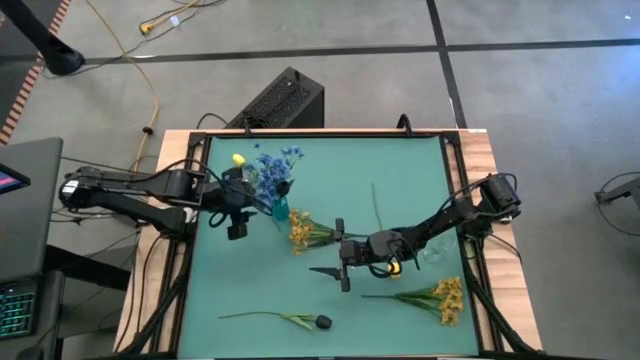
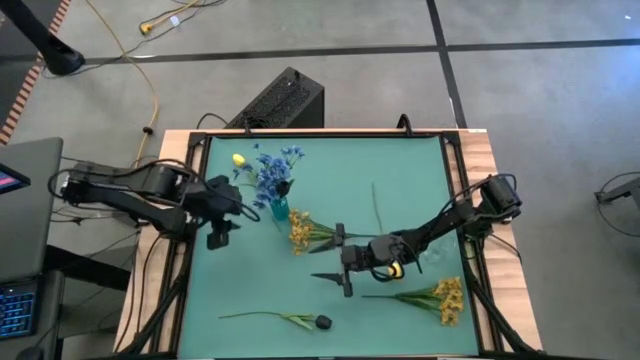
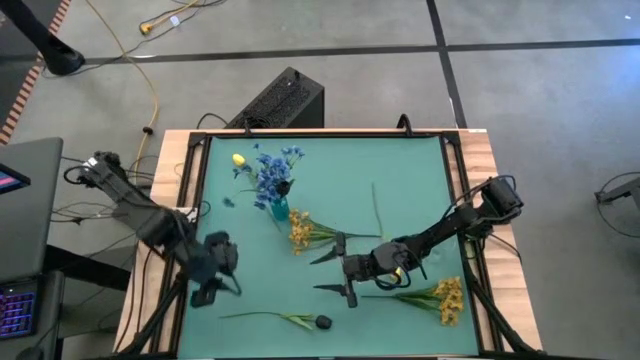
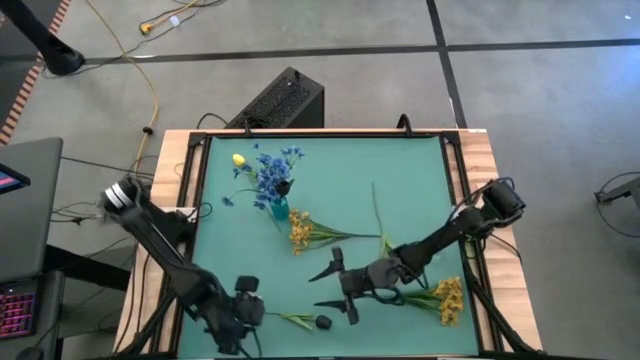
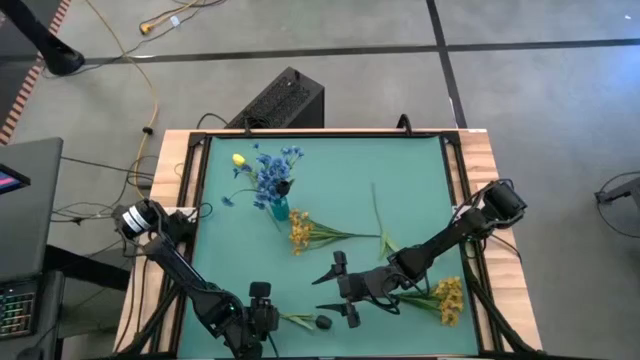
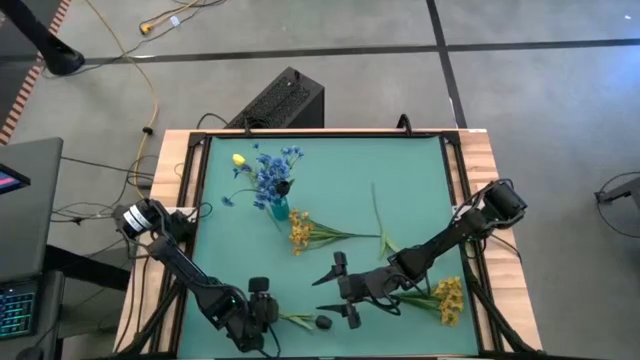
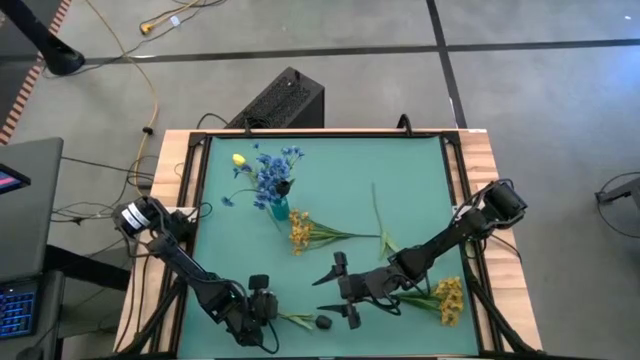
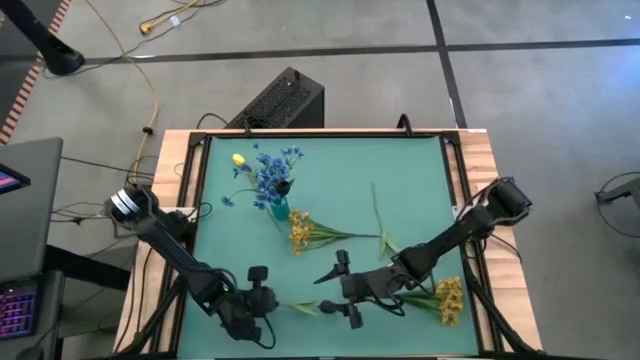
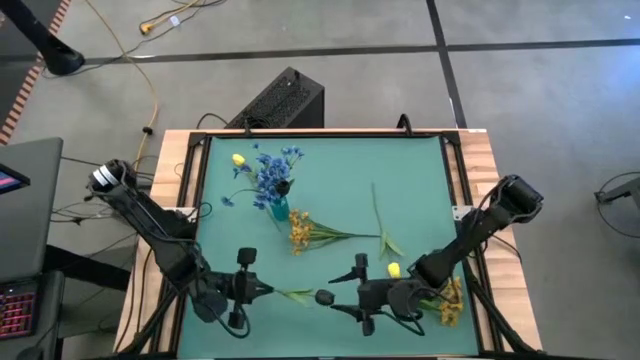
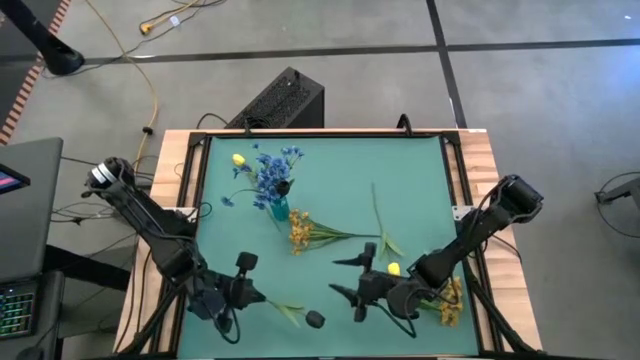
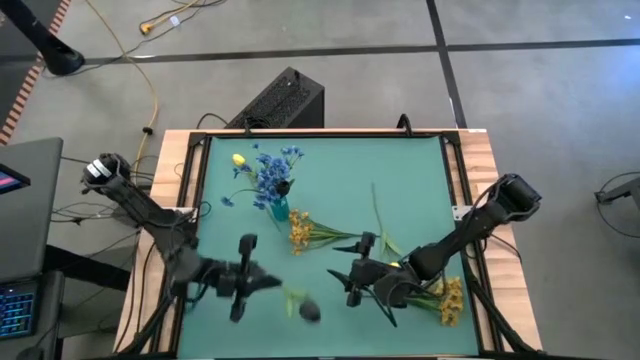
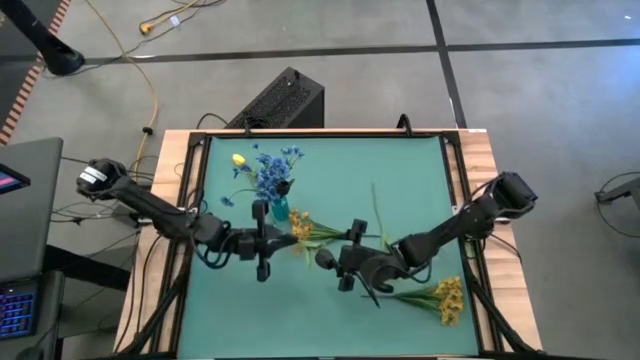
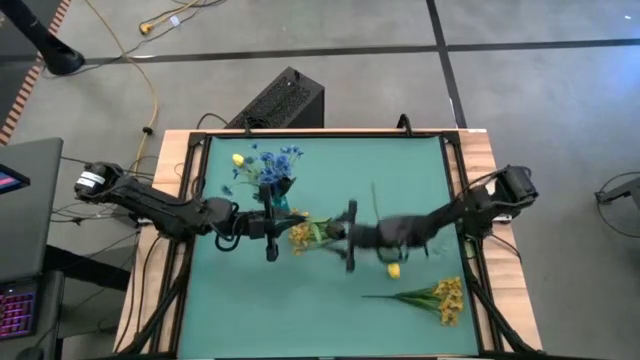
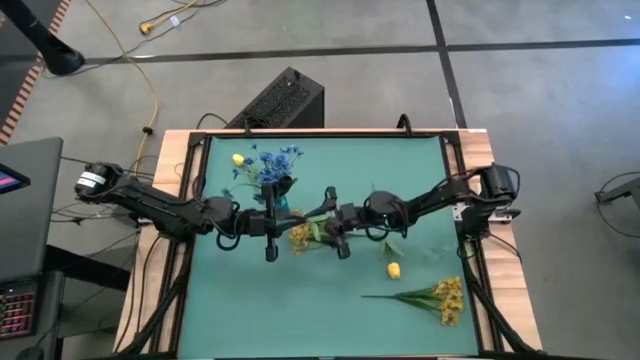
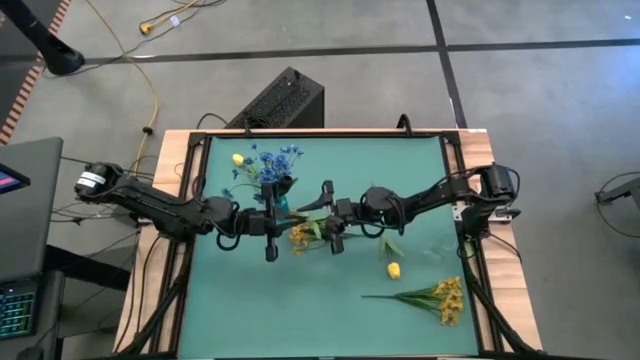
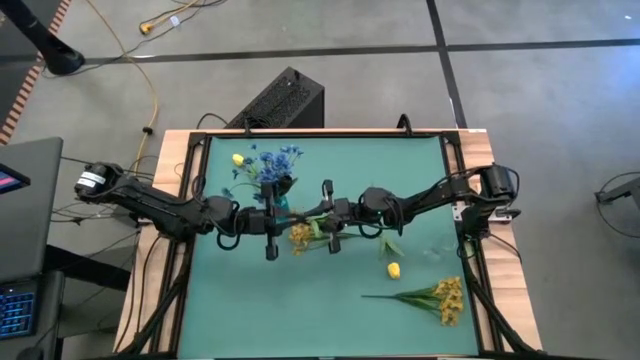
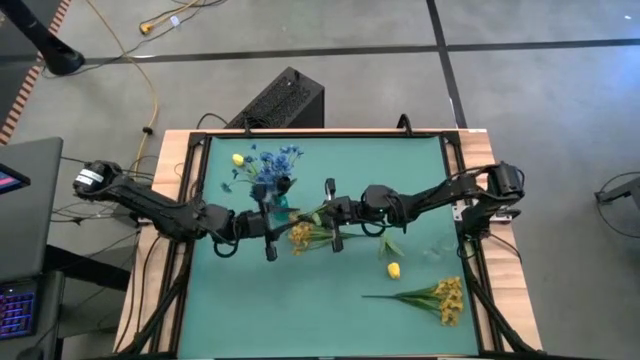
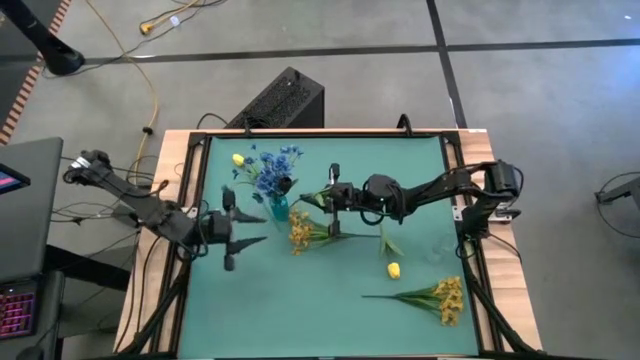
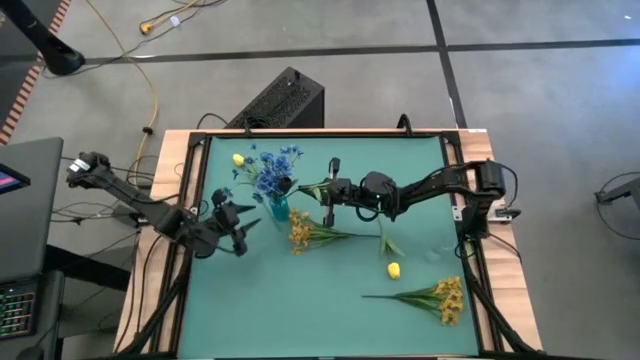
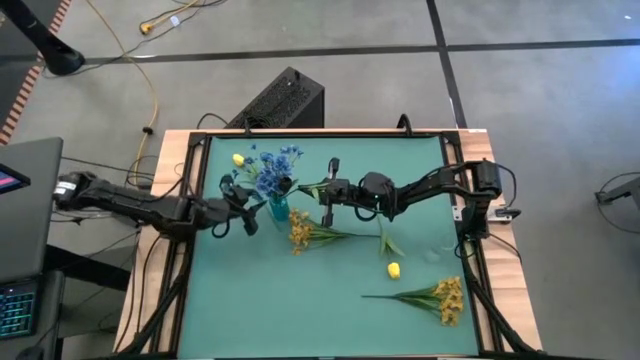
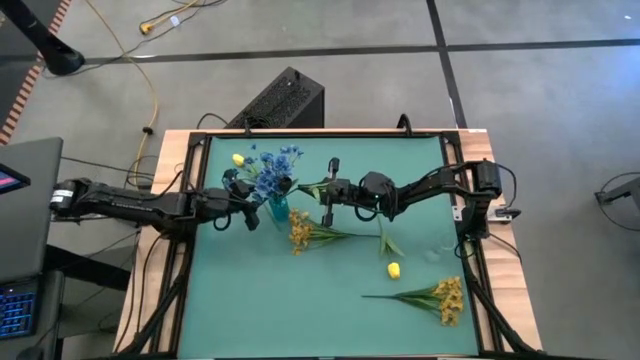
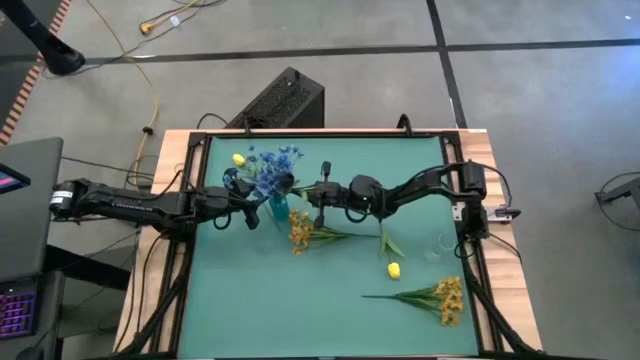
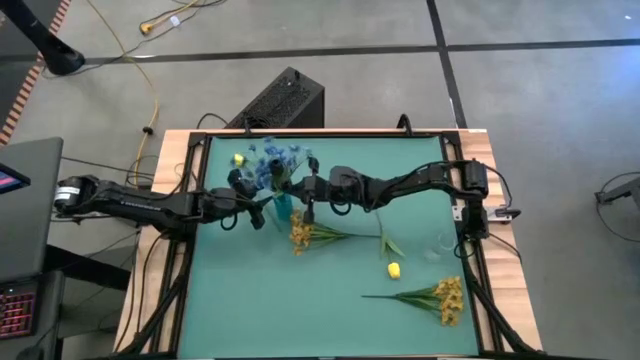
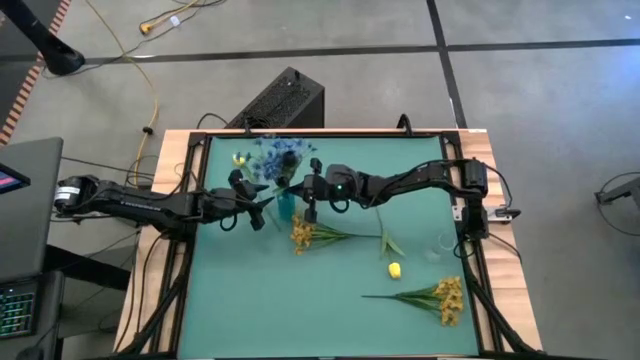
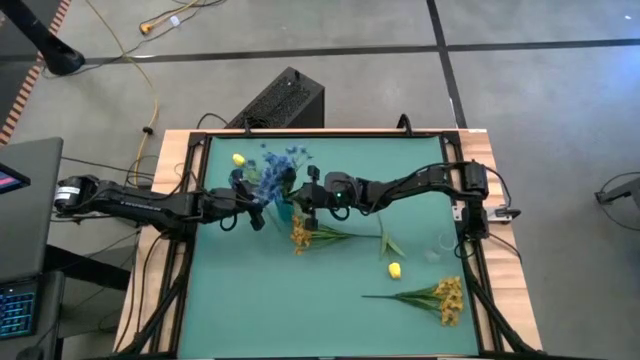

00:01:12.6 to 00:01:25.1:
Task: Sort flowers into vase by color
Put the black flower into the blue vase

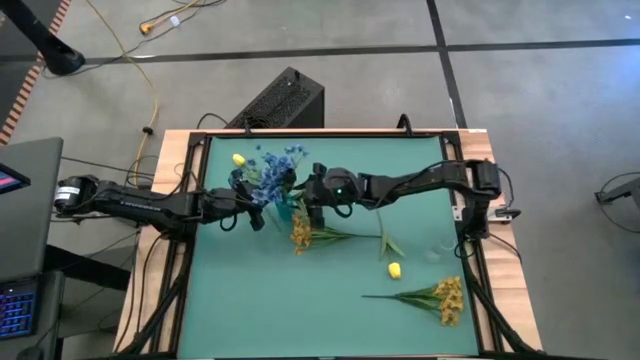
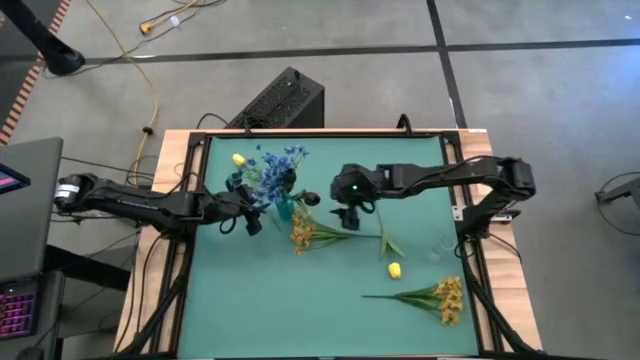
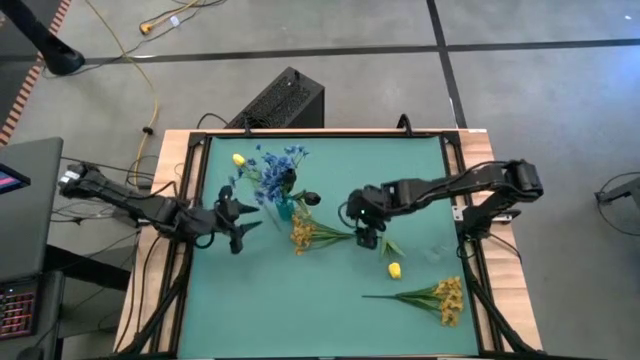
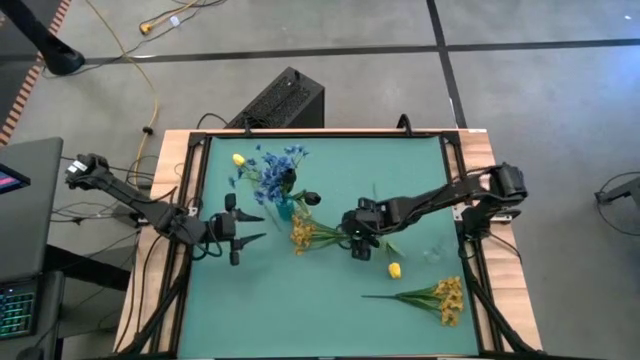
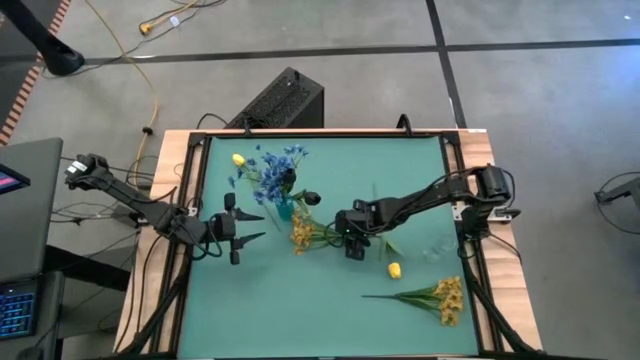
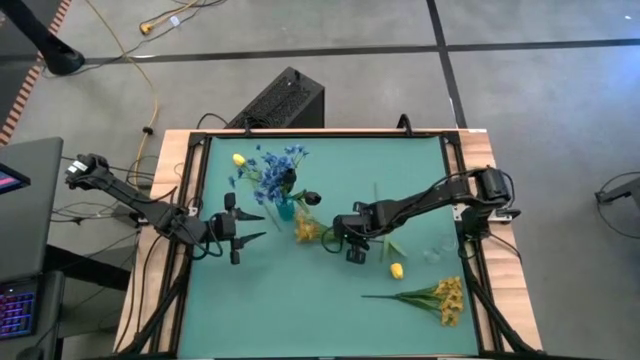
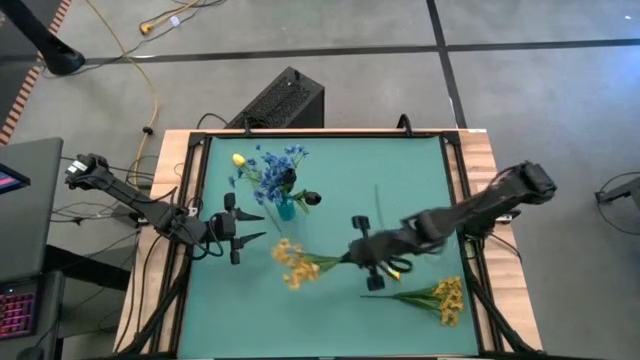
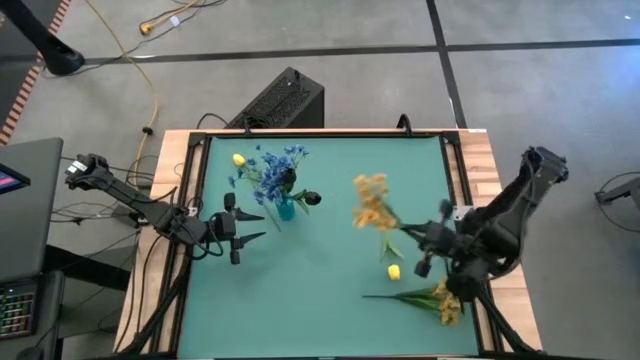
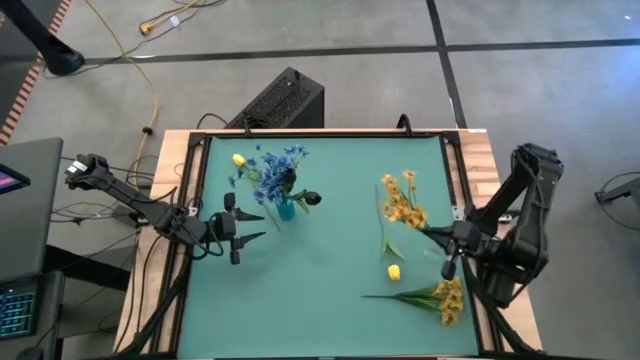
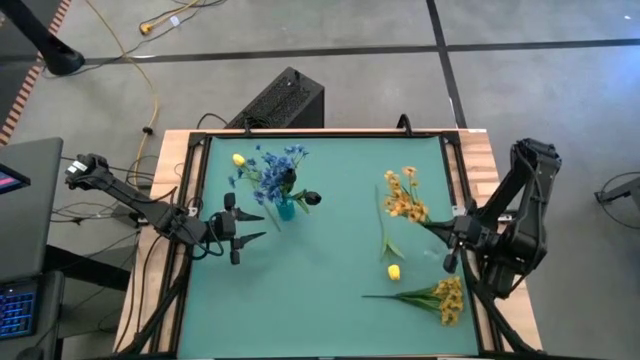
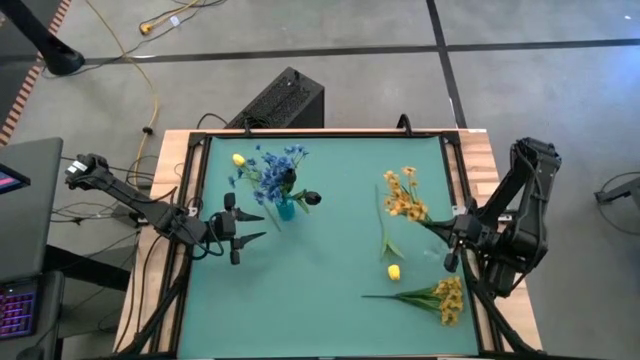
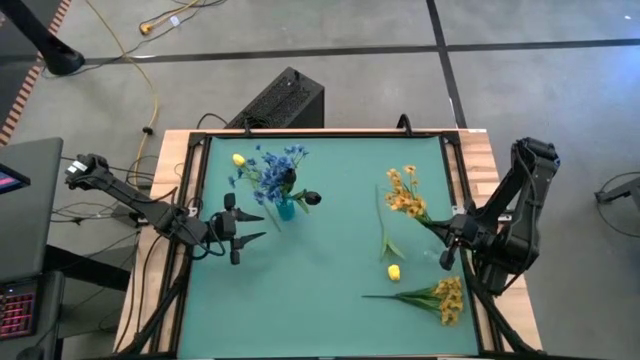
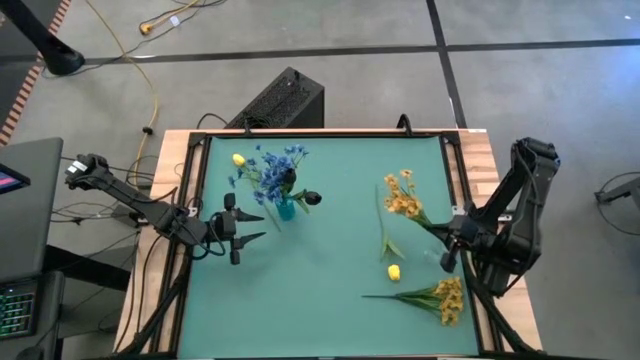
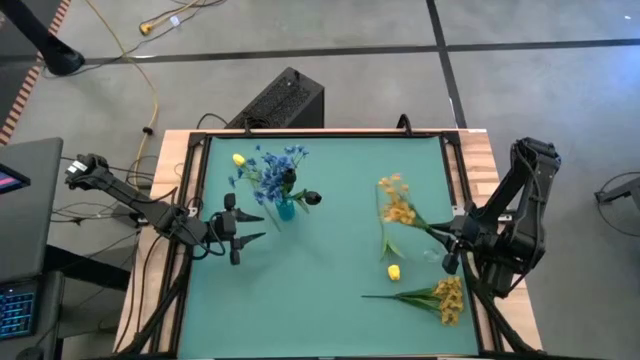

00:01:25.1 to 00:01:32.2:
Put the top yellow flowers into the transparent vase
